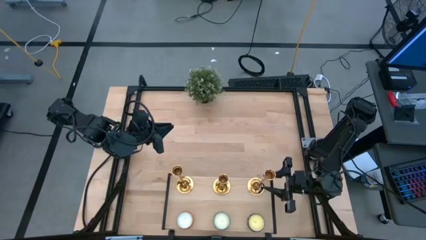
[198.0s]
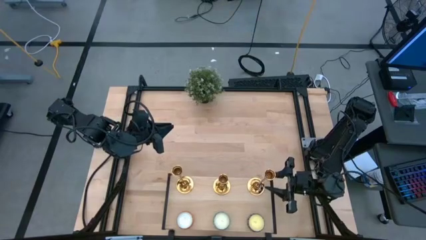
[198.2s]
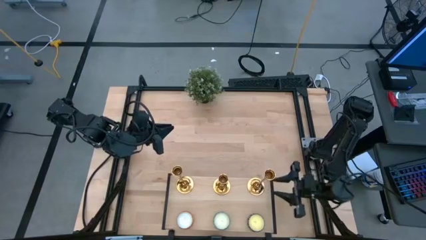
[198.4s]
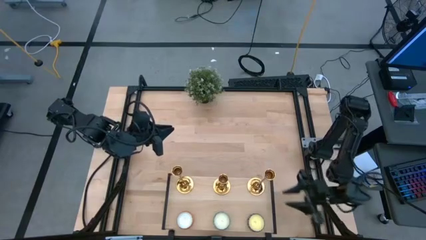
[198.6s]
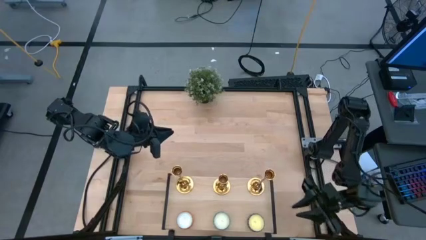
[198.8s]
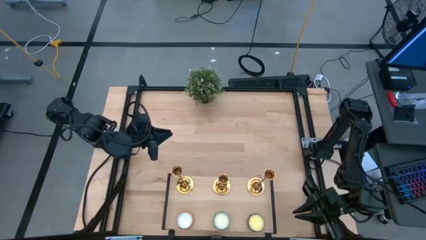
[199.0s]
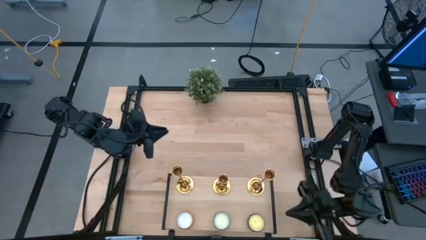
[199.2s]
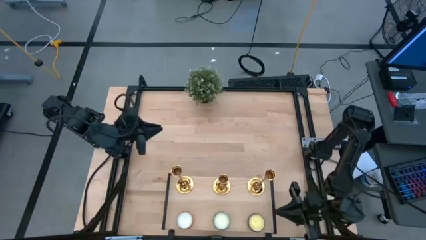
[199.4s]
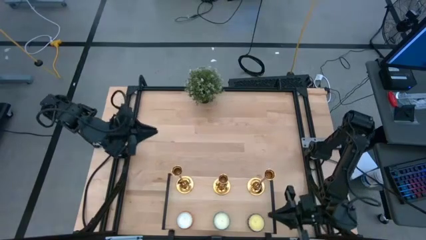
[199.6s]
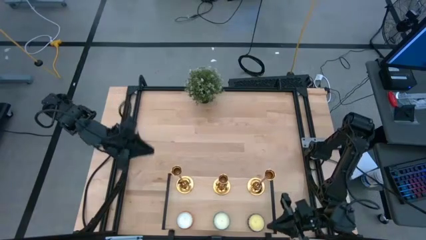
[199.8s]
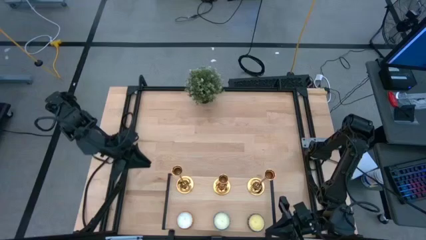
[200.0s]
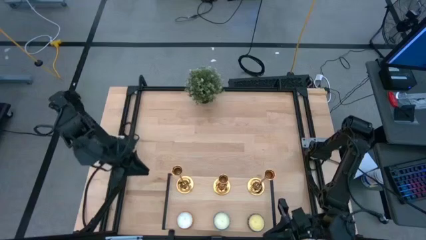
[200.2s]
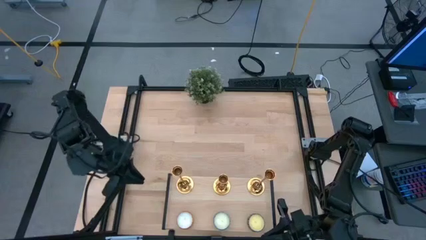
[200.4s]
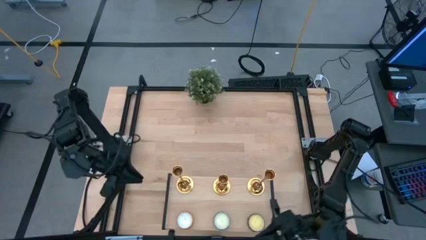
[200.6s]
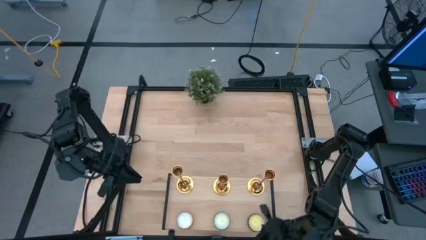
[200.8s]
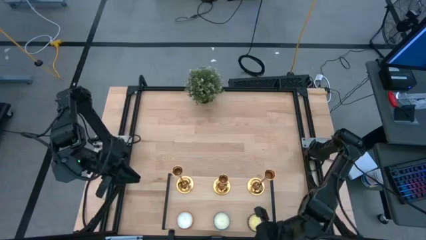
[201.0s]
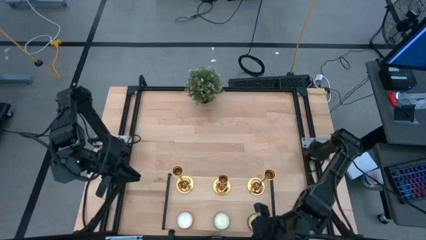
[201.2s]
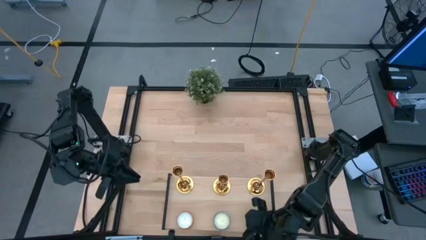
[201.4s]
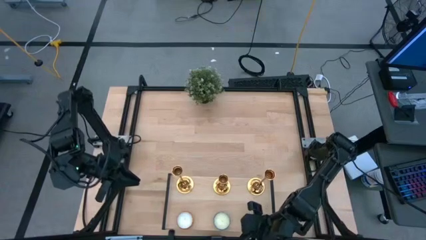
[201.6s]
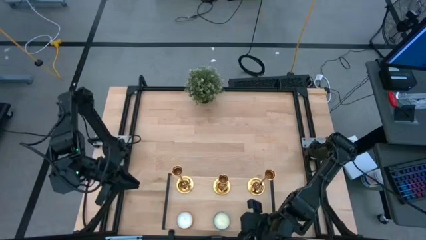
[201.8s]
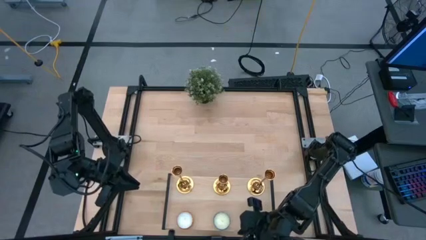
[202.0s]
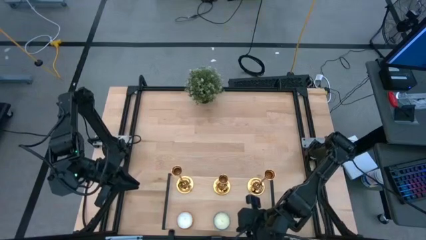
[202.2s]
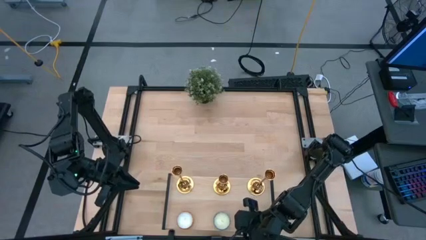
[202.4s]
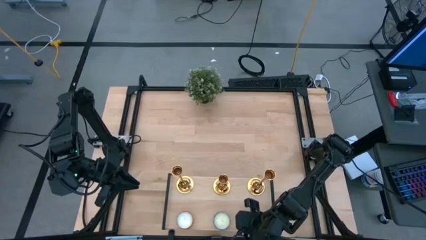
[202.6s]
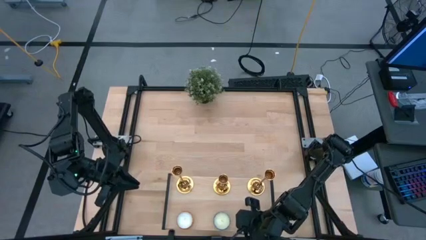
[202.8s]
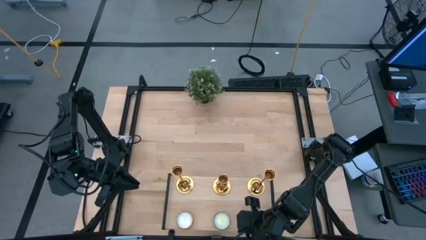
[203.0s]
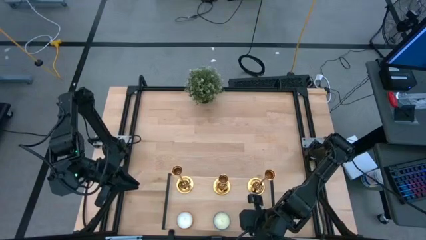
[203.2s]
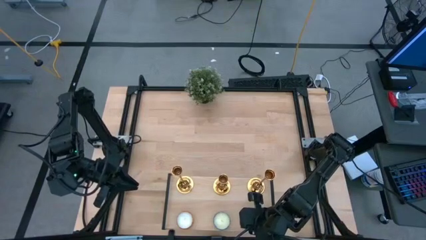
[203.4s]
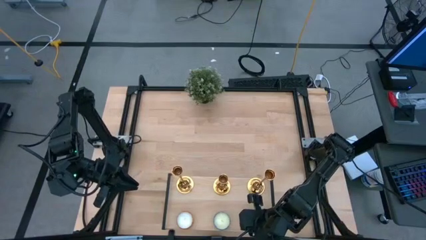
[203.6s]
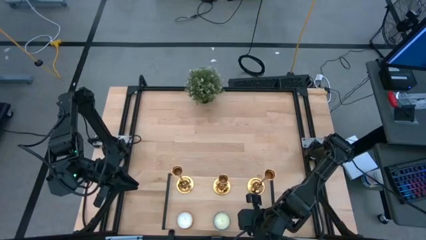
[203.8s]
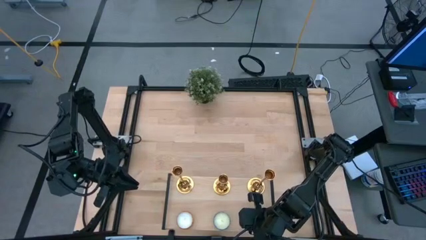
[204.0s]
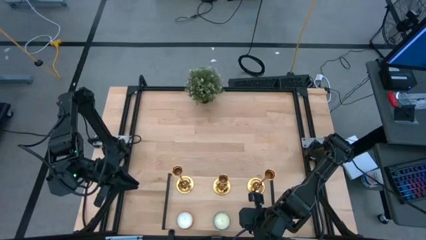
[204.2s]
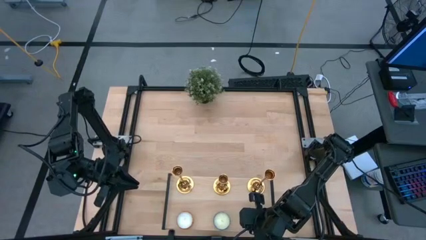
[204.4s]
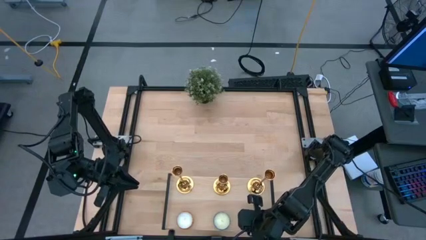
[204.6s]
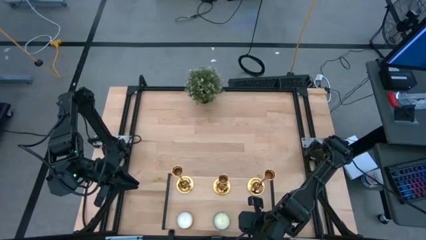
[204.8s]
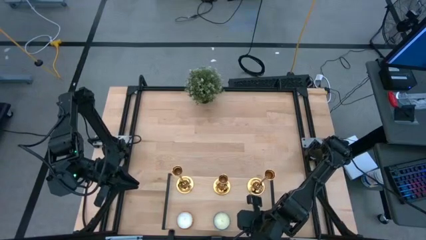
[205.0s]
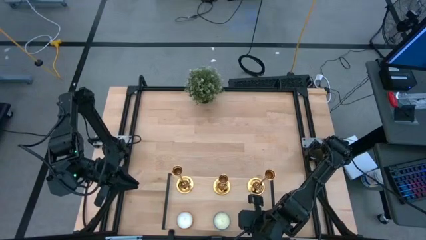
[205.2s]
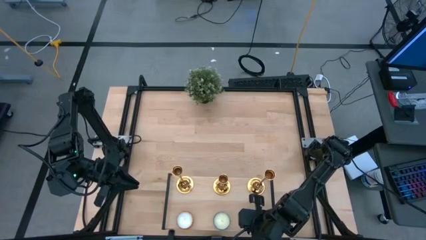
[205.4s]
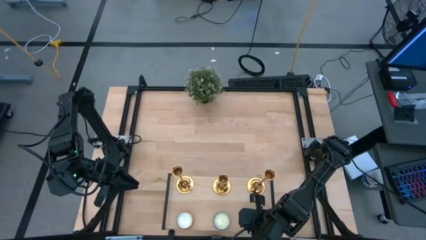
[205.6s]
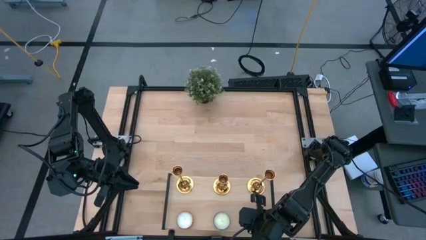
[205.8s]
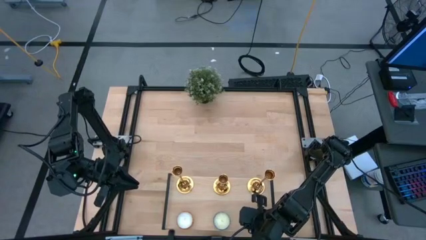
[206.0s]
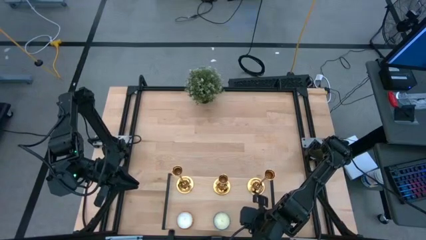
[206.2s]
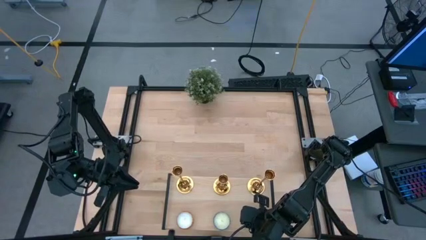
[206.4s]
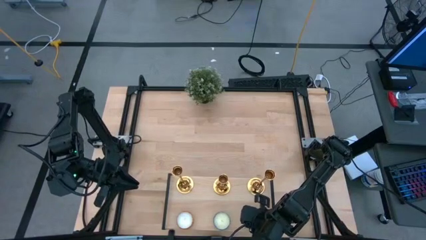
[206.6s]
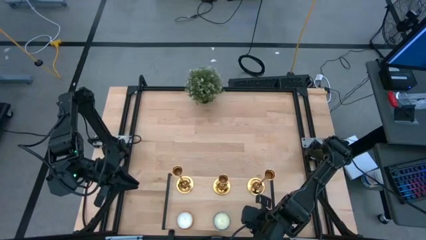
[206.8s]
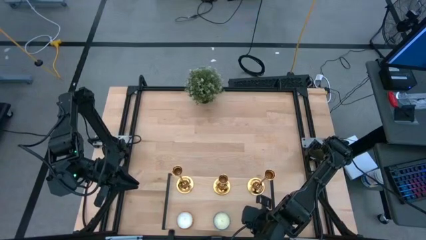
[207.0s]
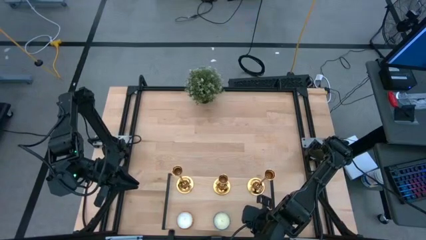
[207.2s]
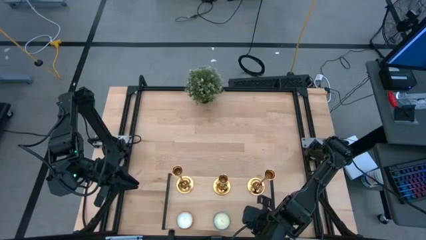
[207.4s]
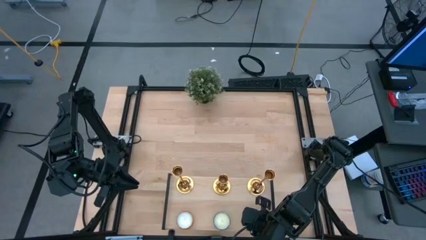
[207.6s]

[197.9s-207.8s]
Task: Pick & Place candle stick holders
Adjust the red scented candle on the shelf

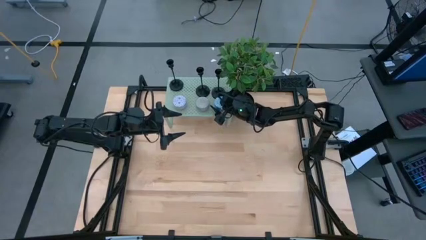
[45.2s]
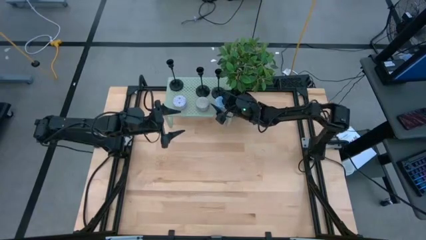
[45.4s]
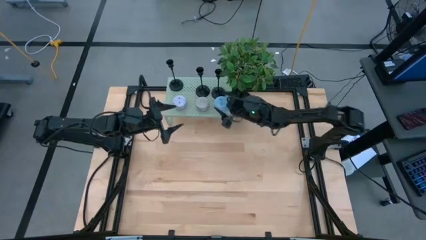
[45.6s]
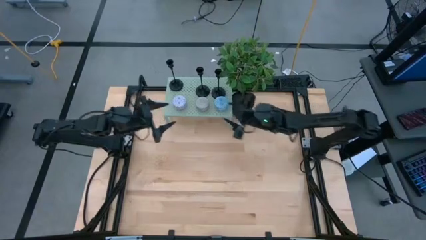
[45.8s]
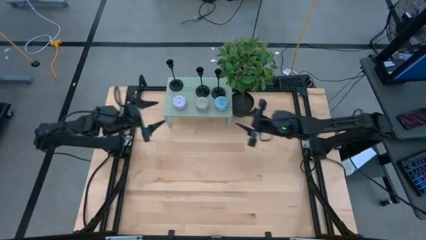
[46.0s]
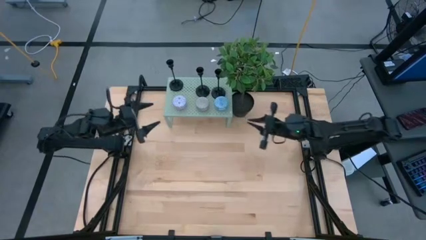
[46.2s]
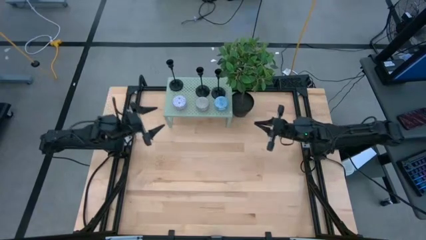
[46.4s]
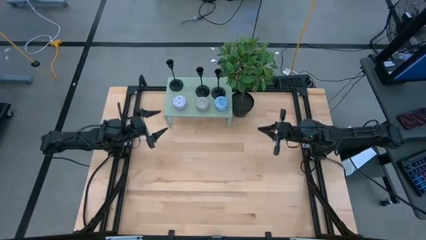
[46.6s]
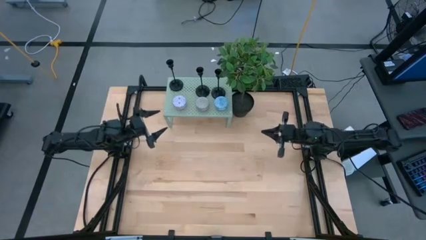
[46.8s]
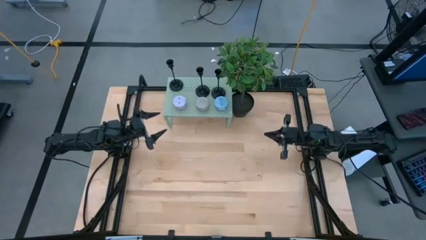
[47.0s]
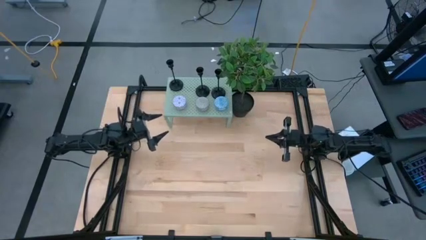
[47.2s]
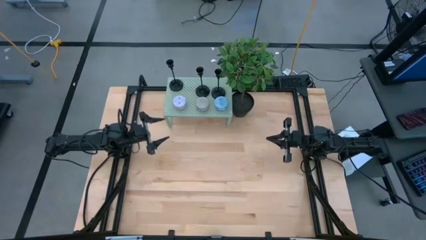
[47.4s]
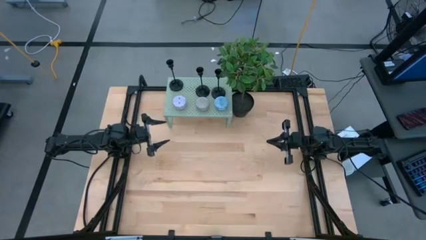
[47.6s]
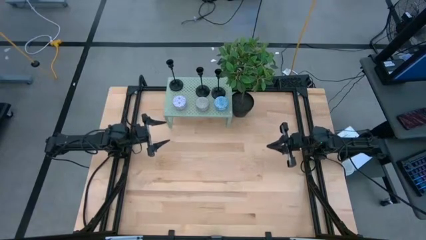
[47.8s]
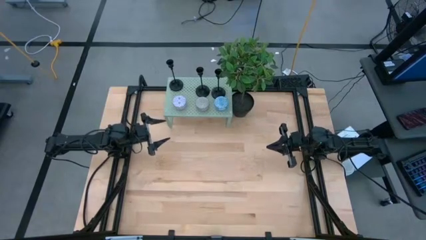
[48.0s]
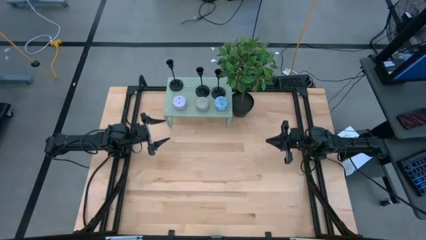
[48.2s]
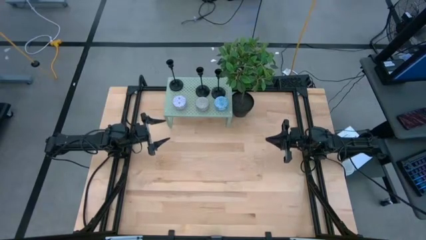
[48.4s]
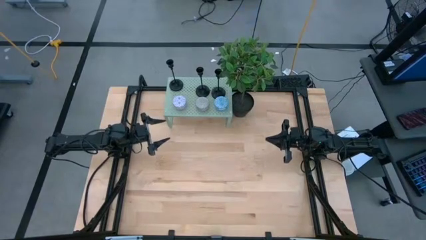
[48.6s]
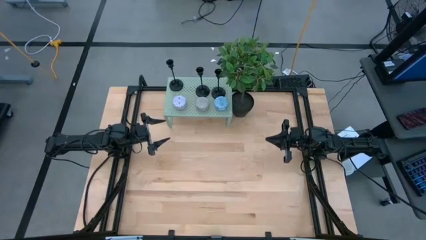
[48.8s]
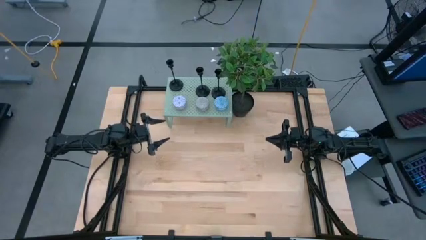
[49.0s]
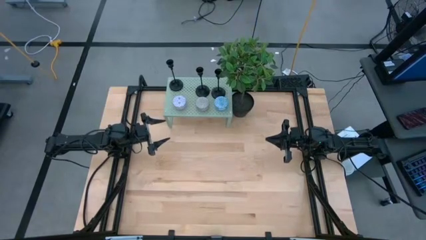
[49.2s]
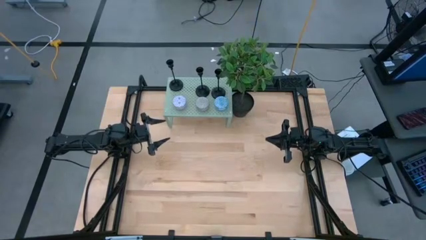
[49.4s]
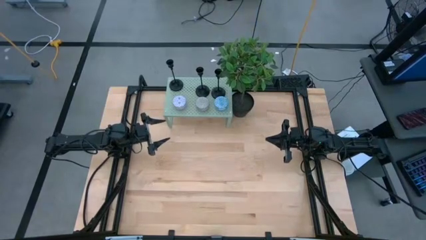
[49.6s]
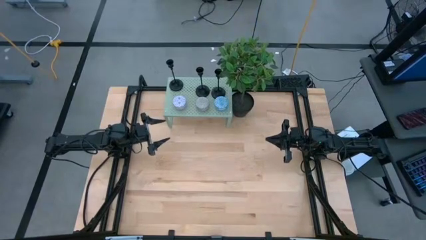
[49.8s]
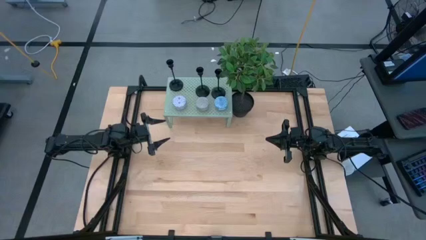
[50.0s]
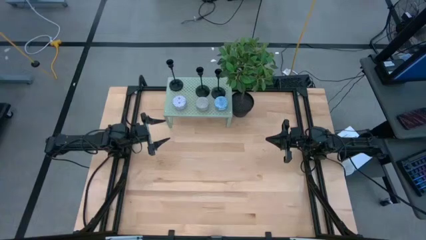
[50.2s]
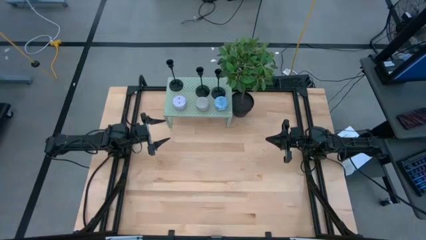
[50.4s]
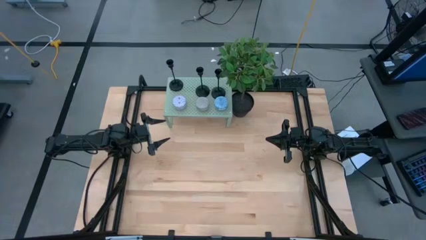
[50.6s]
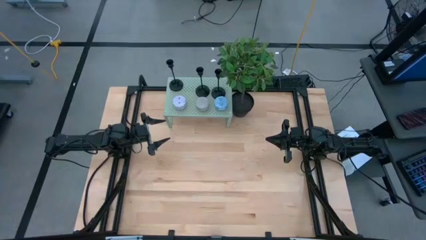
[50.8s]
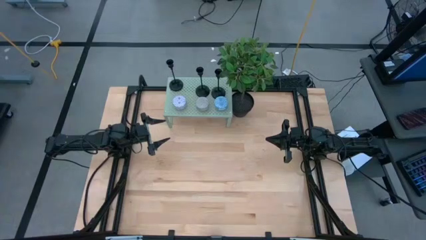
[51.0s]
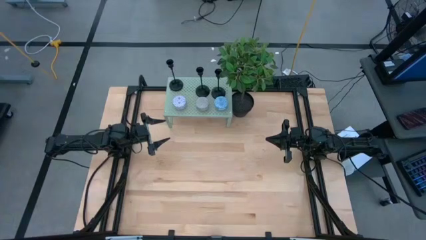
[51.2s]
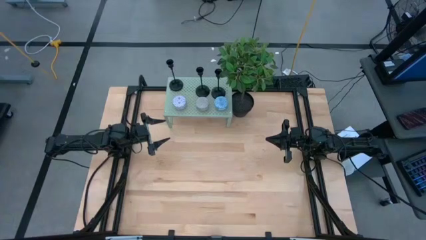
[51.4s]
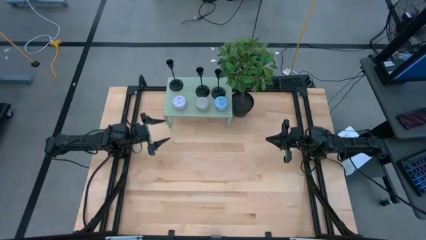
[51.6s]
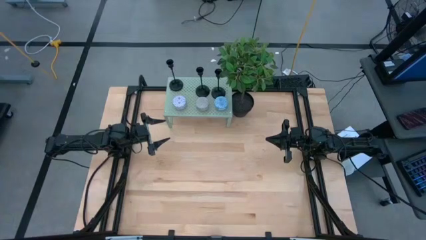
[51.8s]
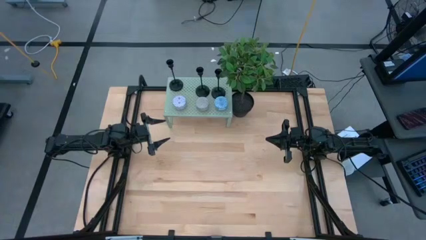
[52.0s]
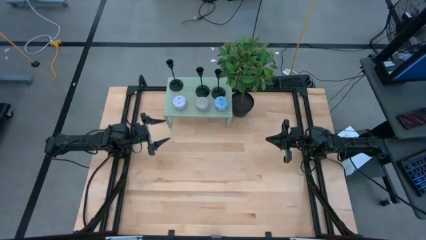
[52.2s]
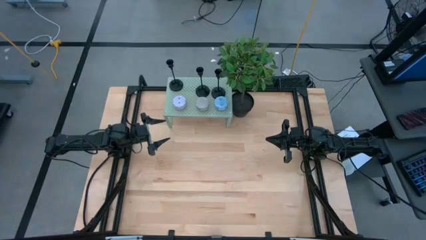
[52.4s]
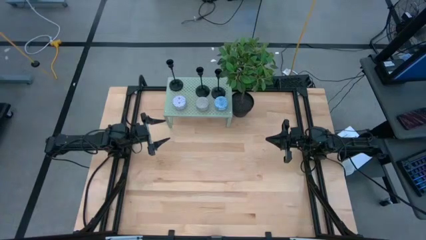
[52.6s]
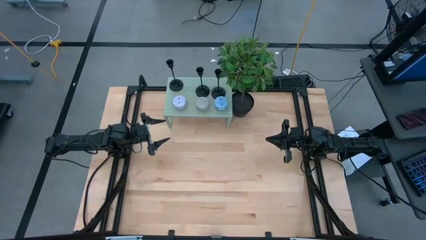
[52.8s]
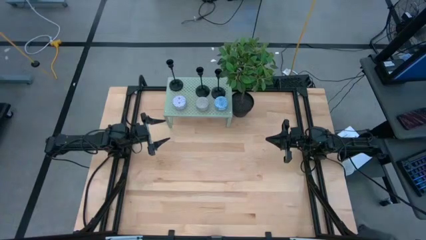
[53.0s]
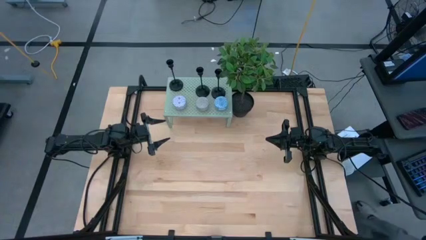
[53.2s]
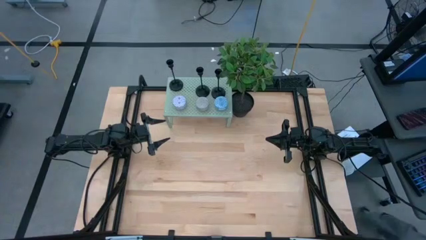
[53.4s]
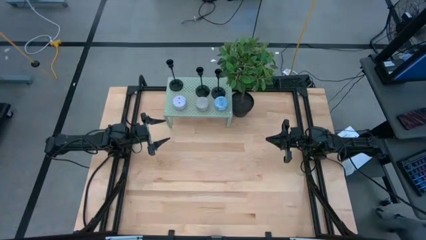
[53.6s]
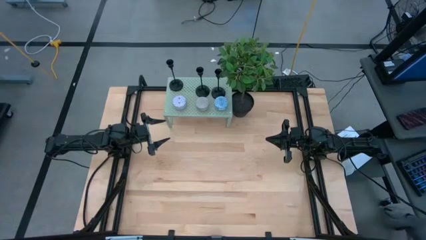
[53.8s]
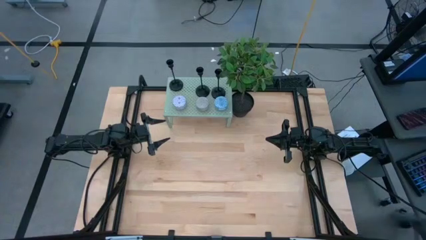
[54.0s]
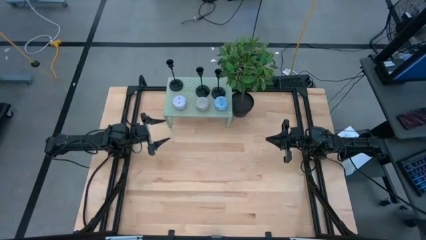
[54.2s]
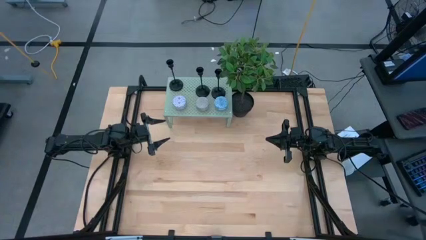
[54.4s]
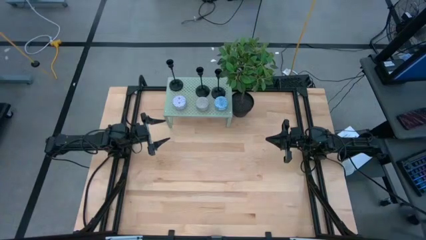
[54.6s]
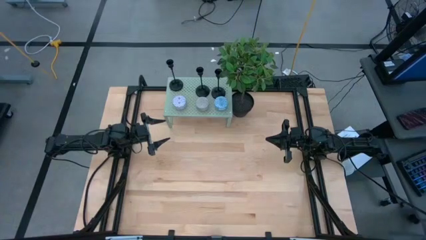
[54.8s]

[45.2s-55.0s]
Task: Pick & Place candle stick holders
Return to Home Position
